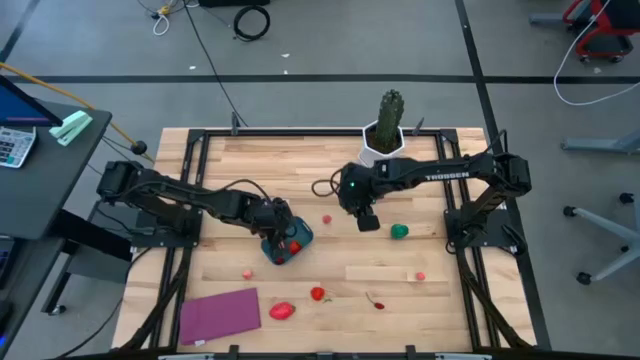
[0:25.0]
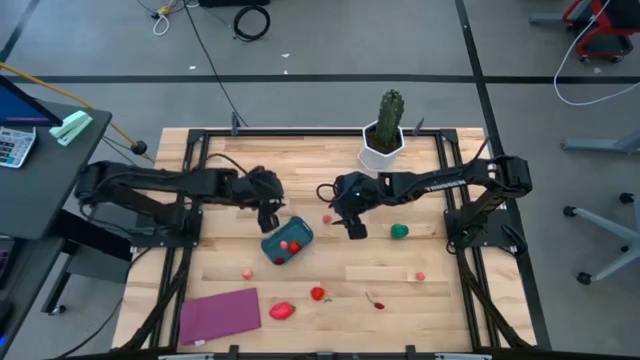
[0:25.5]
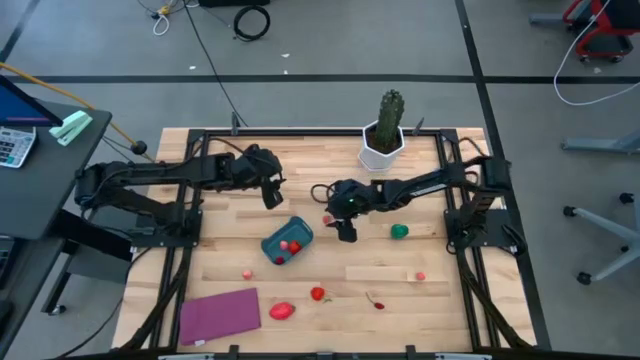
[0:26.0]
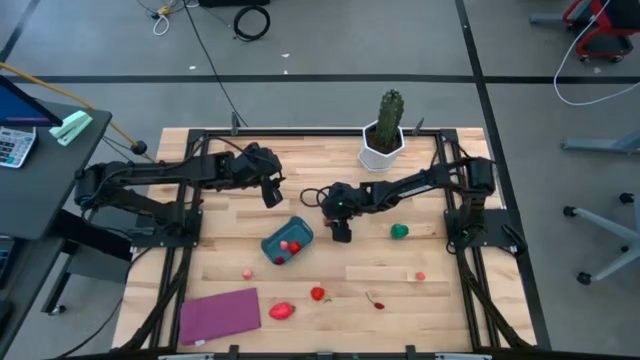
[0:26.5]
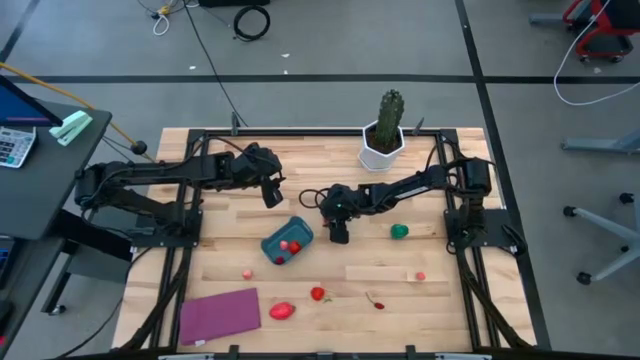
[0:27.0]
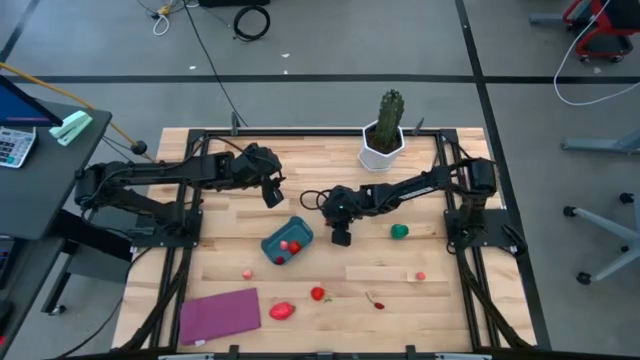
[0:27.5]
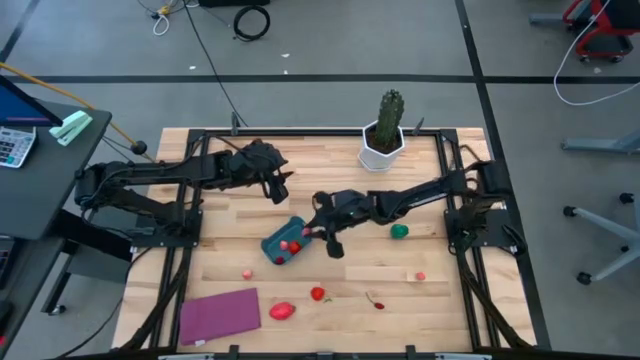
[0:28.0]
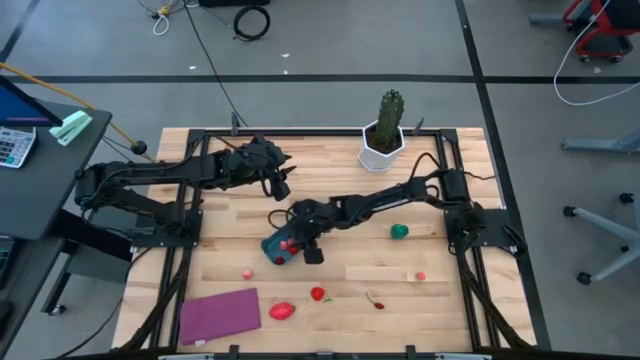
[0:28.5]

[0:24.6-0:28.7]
Task: Pick and placing Produce into tupperware
Put the pink peach into the blue bin

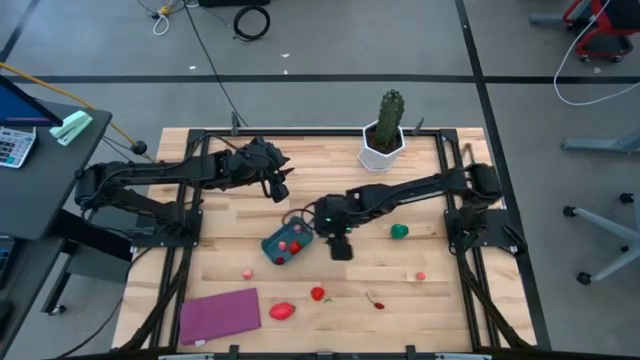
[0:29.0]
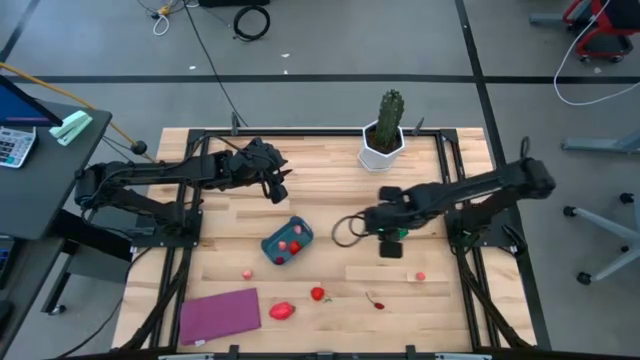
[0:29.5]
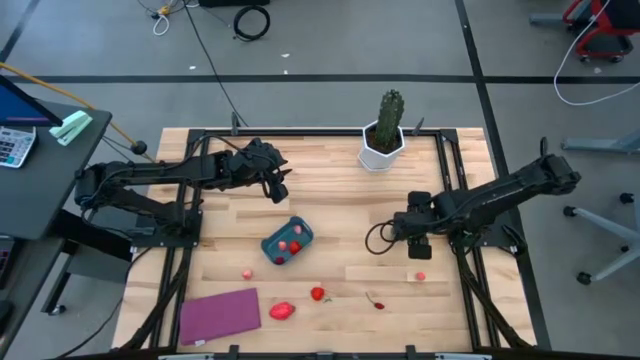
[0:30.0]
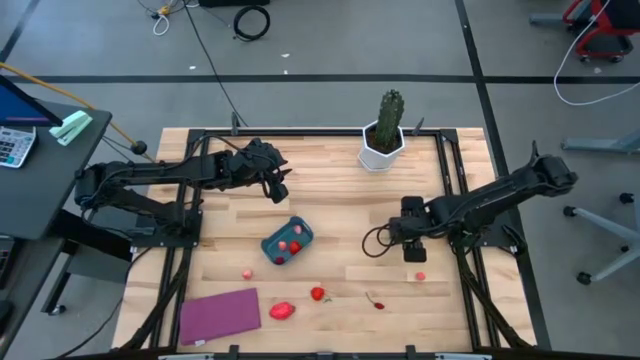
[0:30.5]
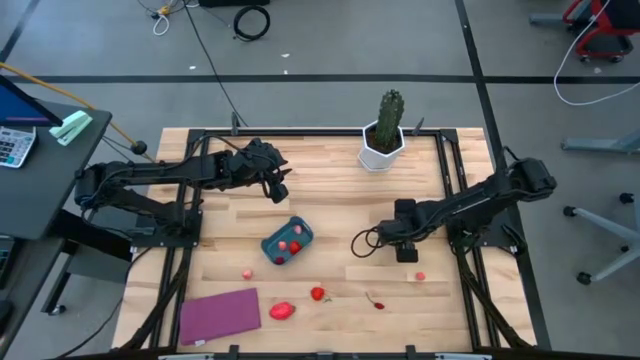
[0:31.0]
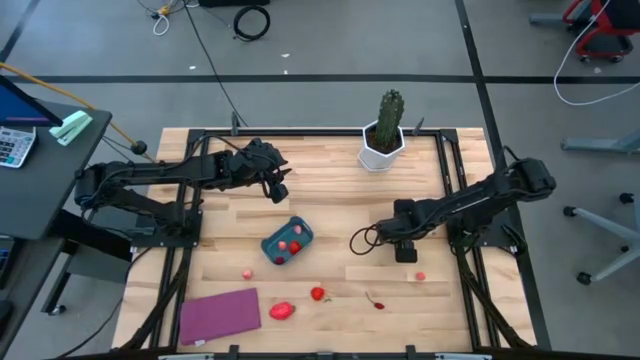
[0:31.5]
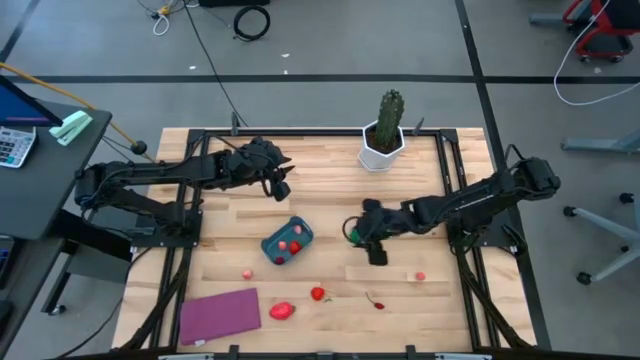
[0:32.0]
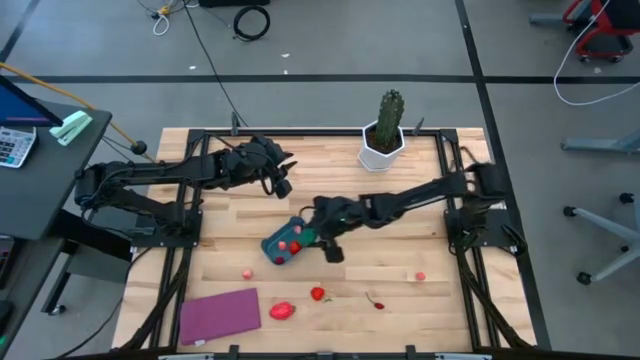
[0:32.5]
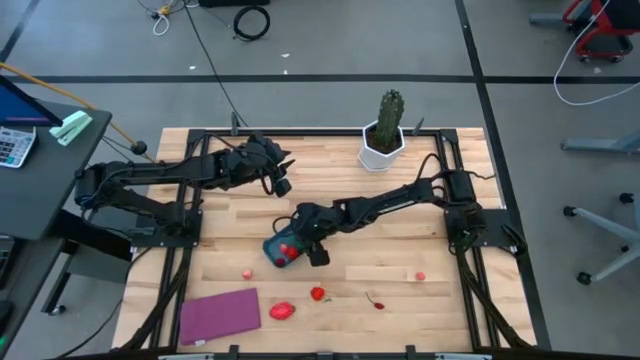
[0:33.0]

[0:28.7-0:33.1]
Put the green bell pepper into the blue bin

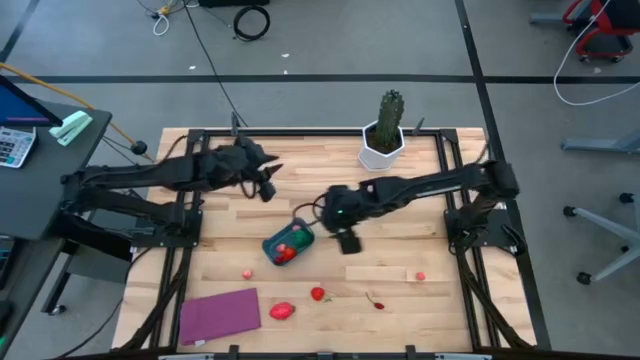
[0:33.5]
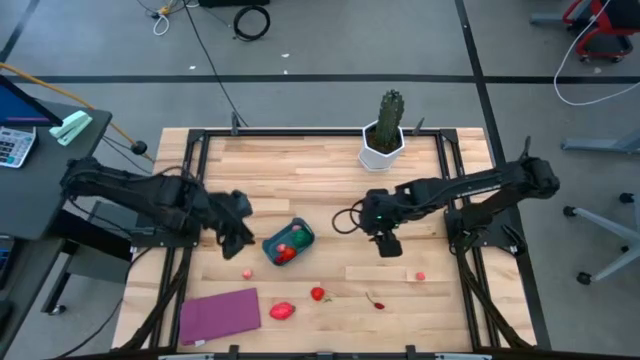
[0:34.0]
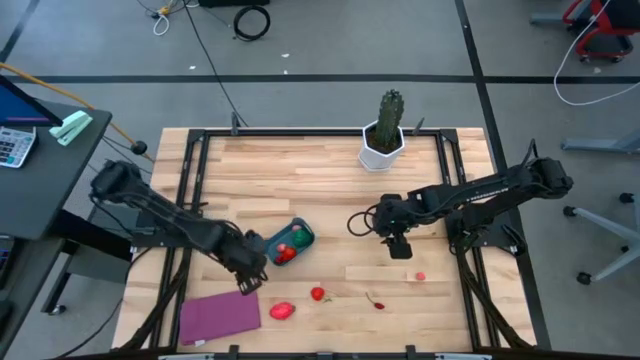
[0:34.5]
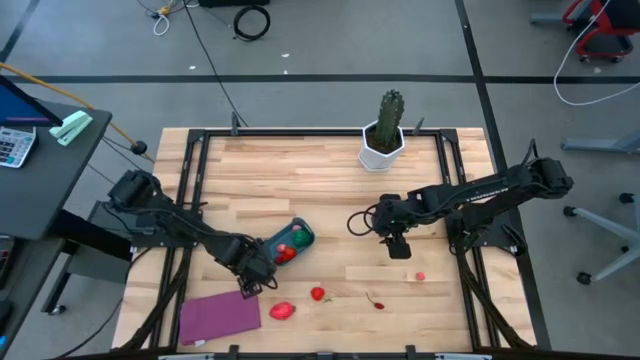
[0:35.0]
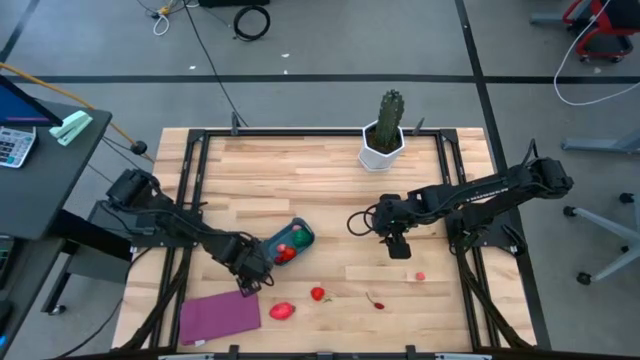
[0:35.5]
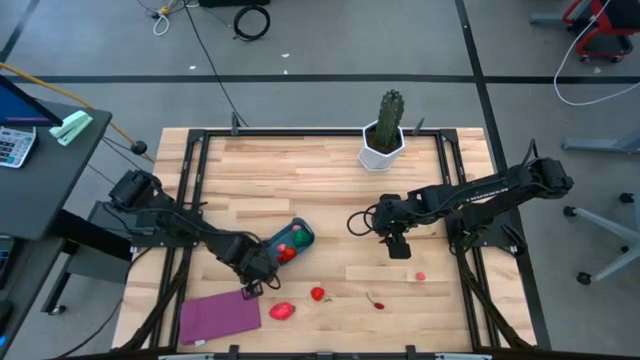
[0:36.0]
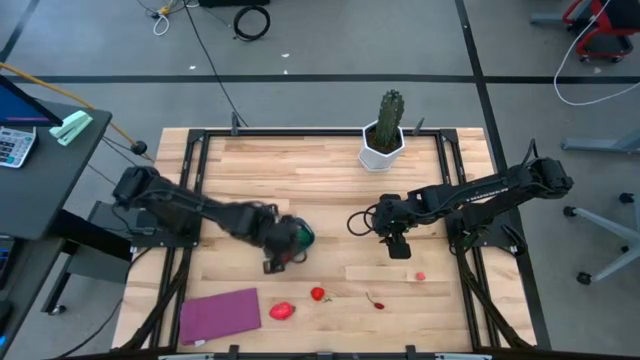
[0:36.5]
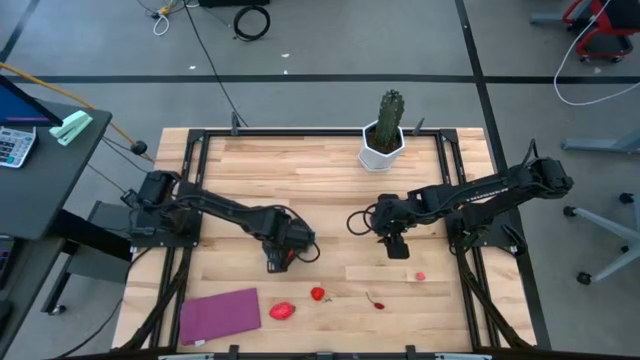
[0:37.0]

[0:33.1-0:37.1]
Put the pink peach into the blue bin

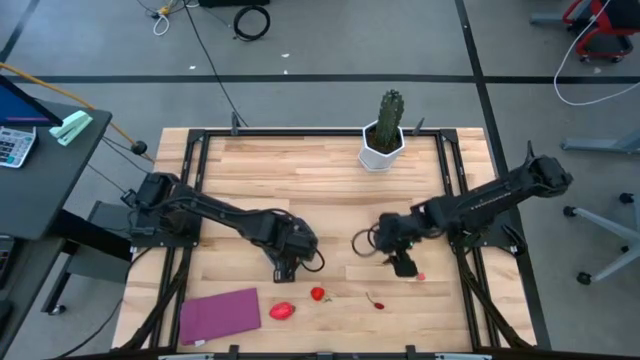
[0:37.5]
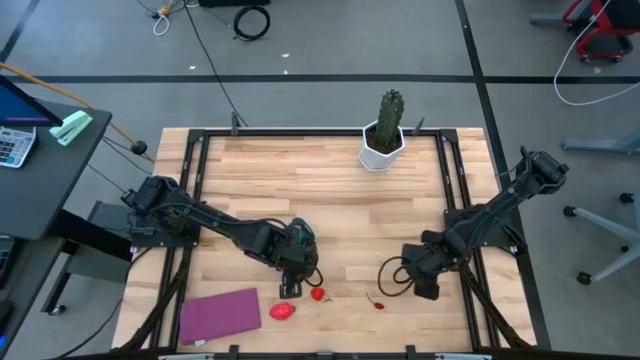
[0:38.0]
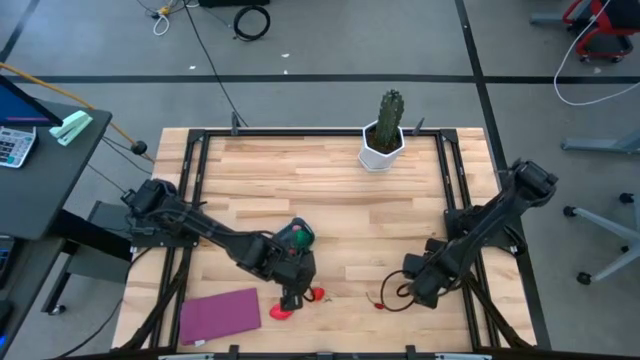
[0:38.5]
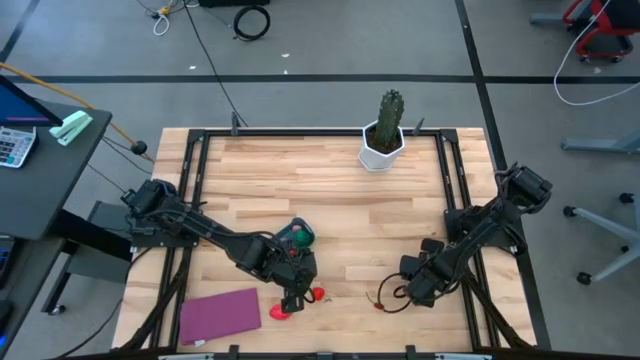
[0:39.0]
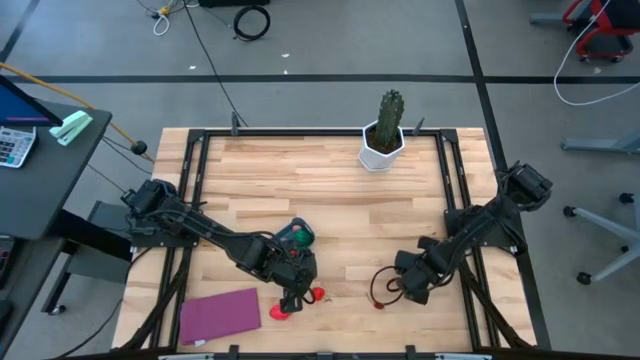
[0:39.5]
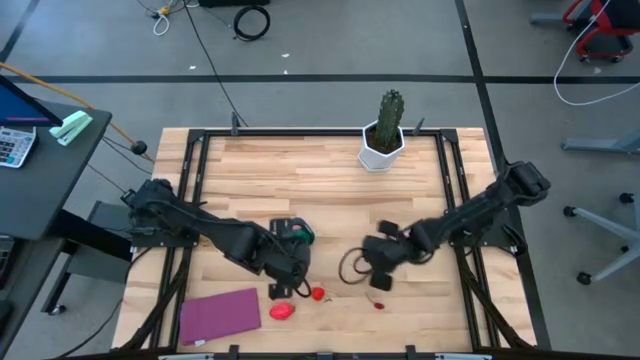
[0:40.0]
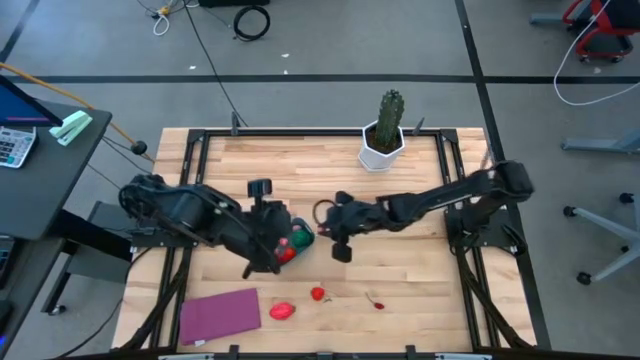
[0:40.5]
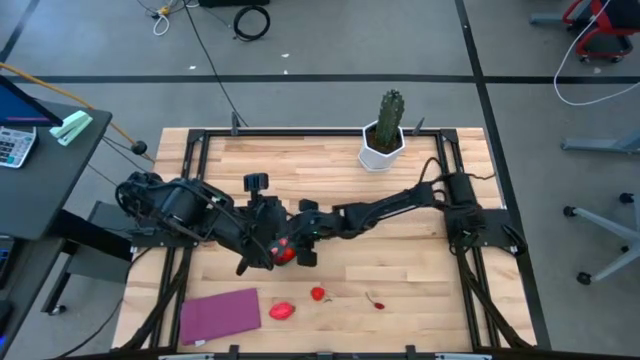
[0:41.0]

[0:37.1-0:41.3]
Put the pink peach into the blue bin

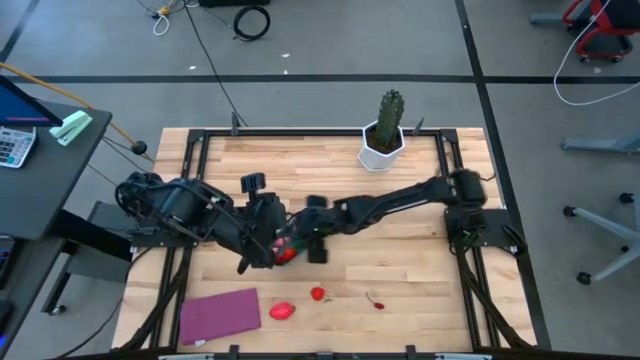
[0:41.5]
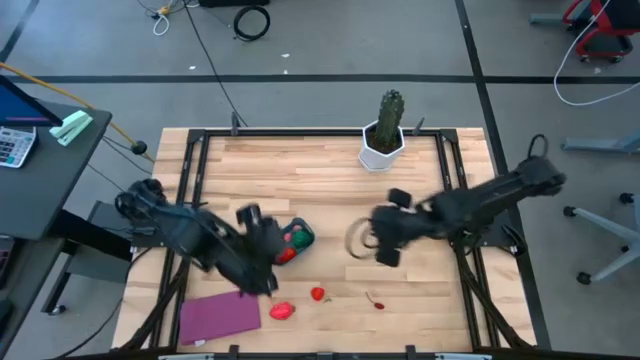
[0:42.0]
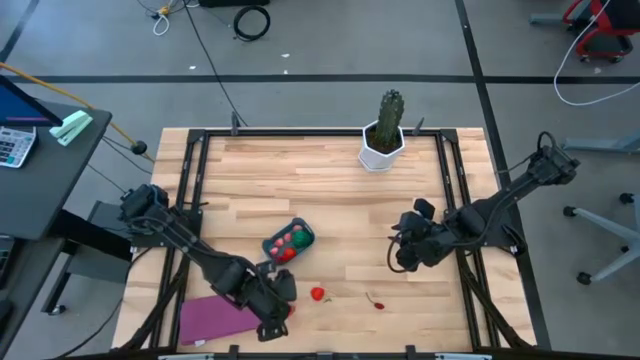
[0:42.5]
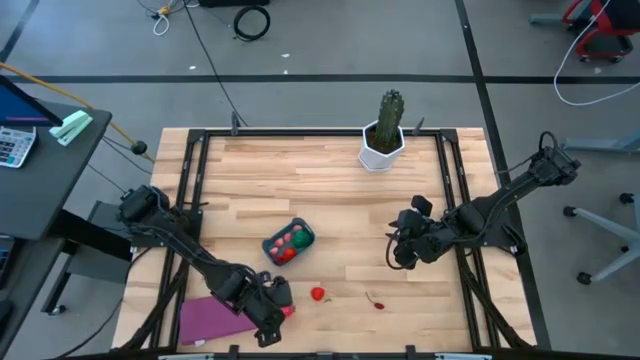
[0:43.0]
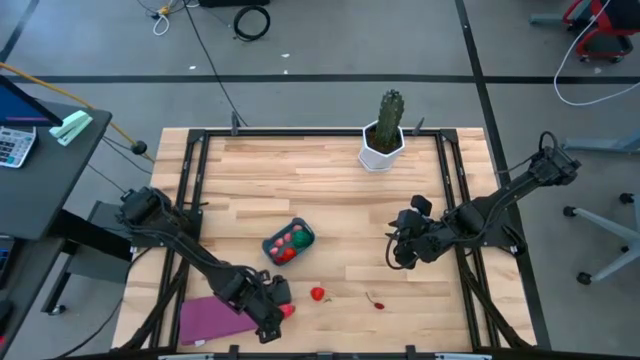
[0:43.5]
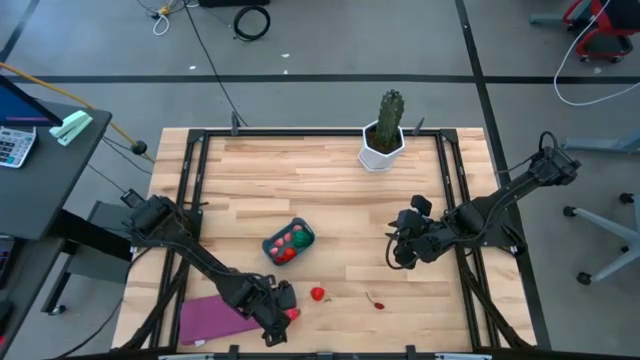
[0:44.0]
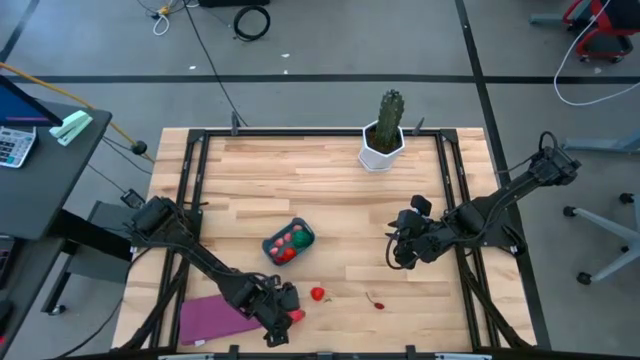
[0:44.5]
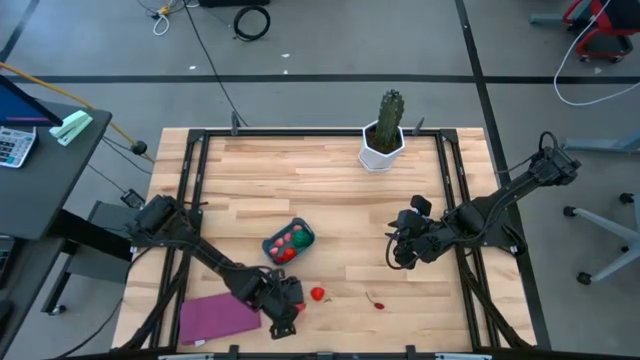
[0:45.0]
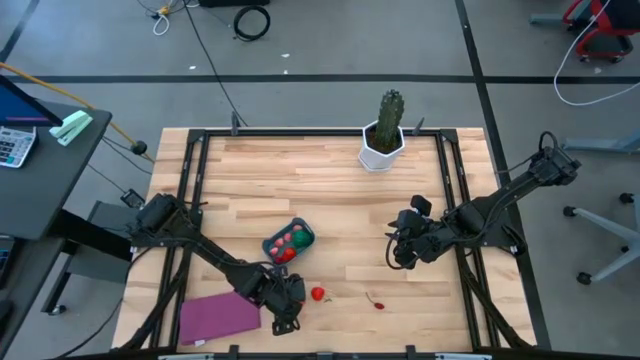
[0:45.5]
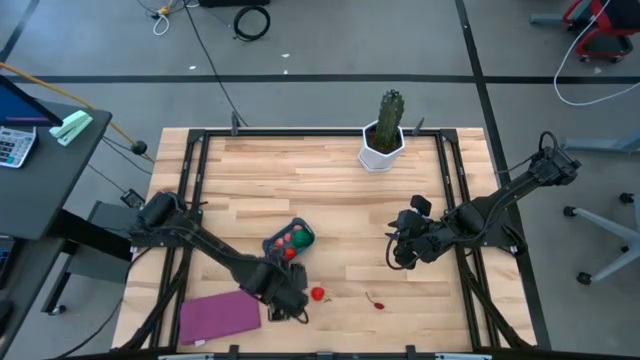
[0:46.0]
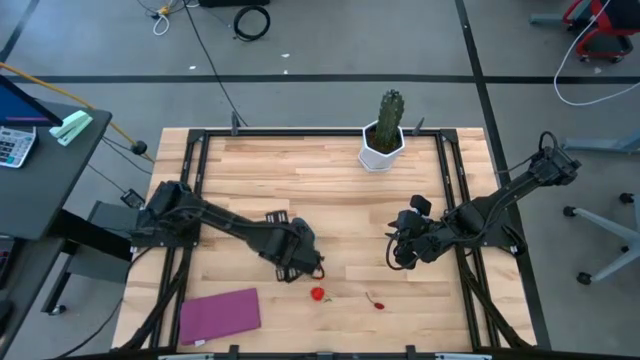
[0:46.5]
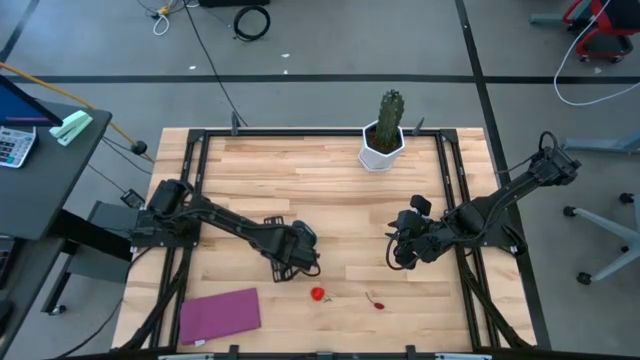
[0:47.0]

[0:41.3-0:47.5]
Put the pink dragon fruit into the blue bin
